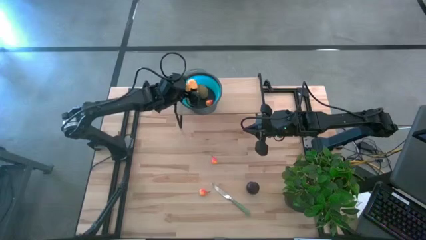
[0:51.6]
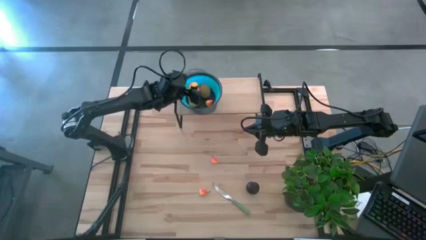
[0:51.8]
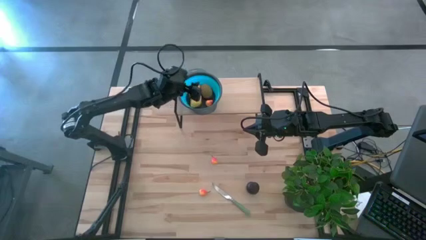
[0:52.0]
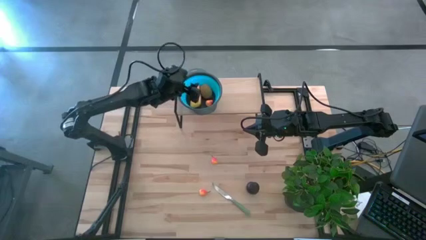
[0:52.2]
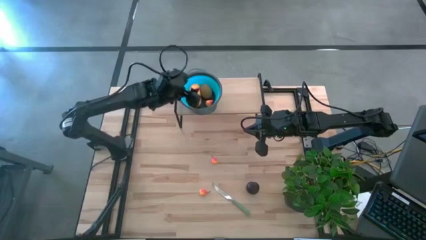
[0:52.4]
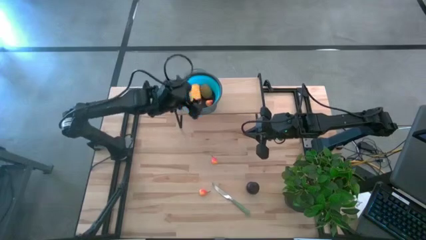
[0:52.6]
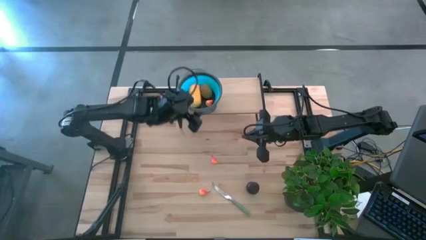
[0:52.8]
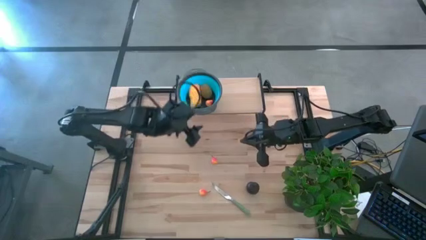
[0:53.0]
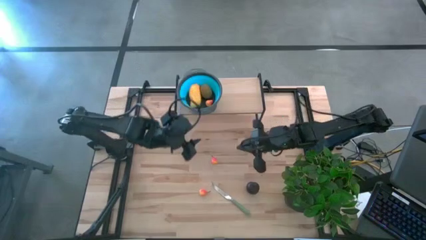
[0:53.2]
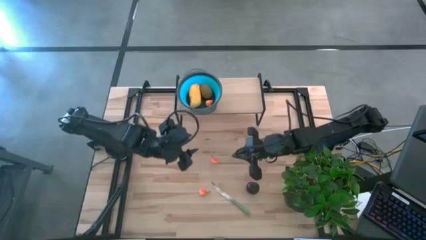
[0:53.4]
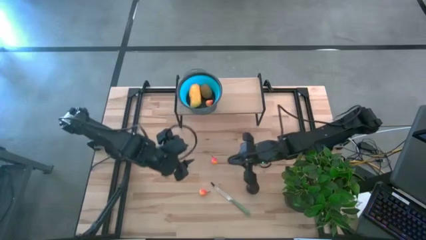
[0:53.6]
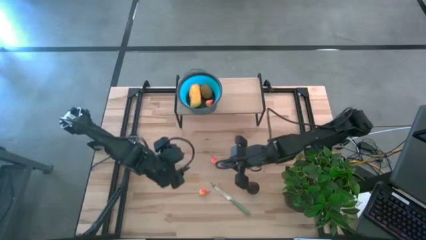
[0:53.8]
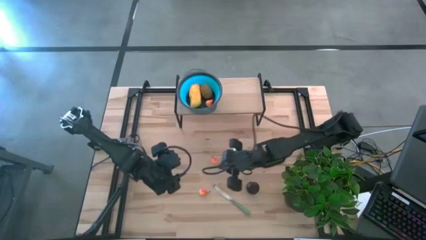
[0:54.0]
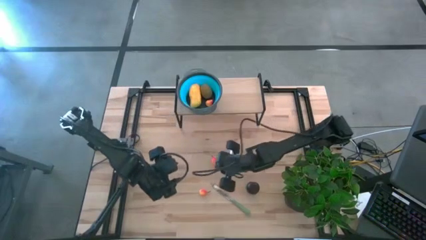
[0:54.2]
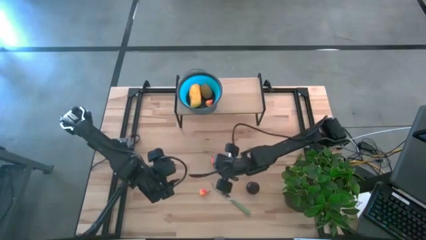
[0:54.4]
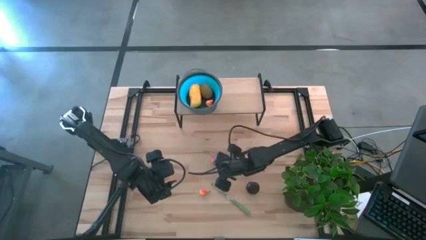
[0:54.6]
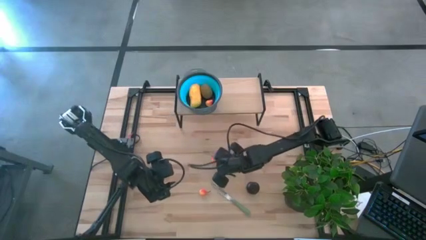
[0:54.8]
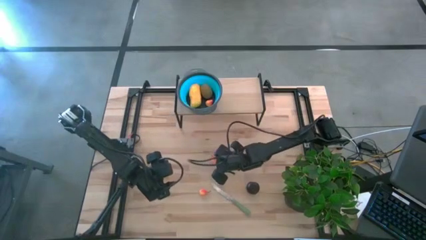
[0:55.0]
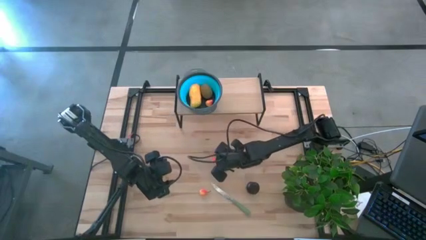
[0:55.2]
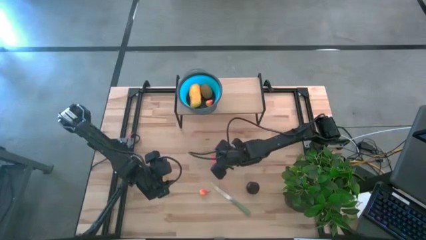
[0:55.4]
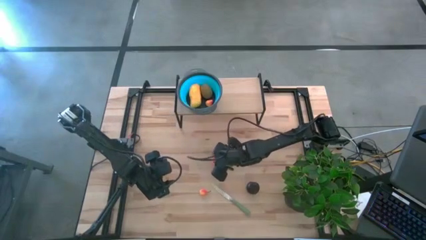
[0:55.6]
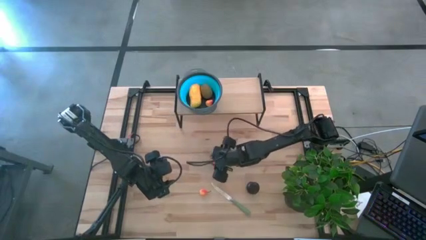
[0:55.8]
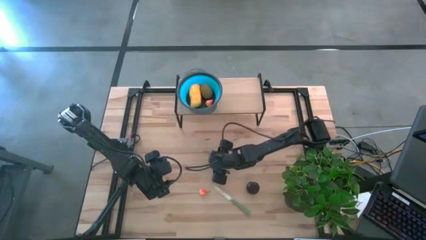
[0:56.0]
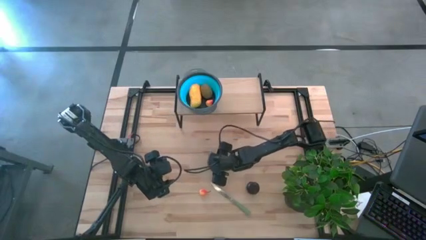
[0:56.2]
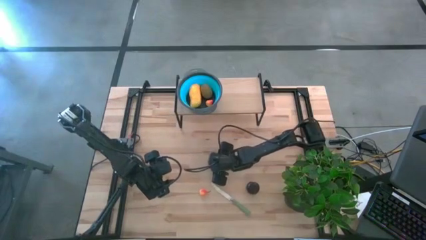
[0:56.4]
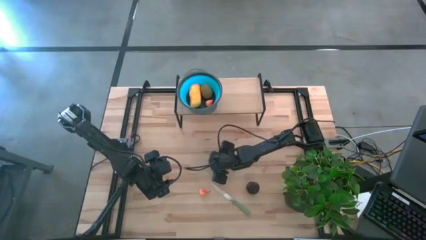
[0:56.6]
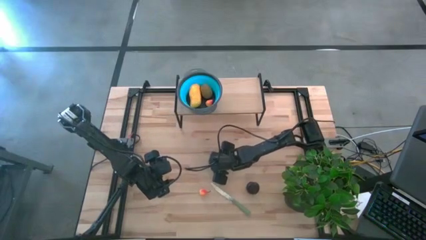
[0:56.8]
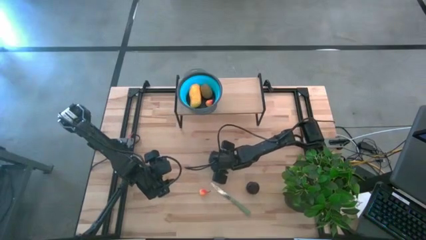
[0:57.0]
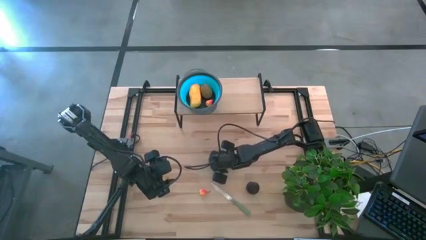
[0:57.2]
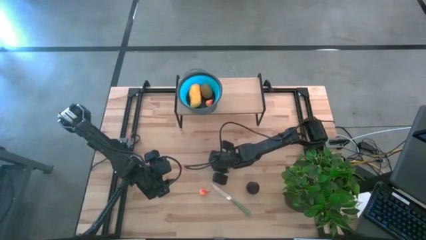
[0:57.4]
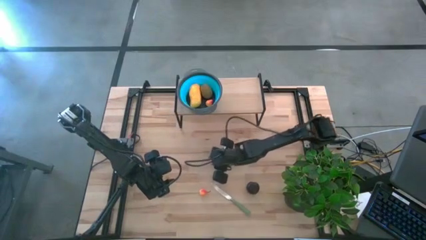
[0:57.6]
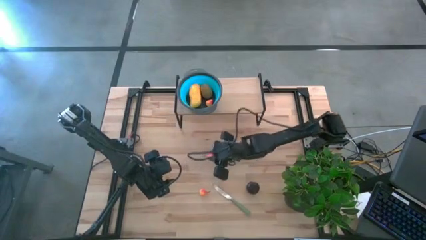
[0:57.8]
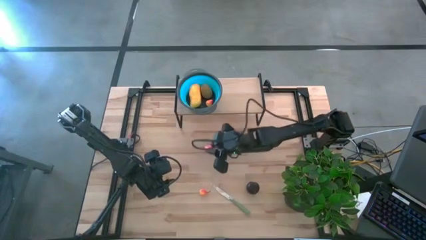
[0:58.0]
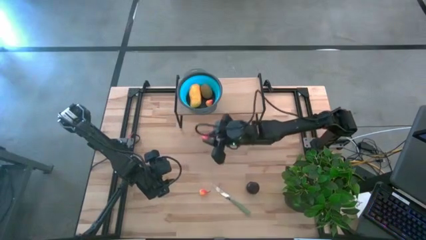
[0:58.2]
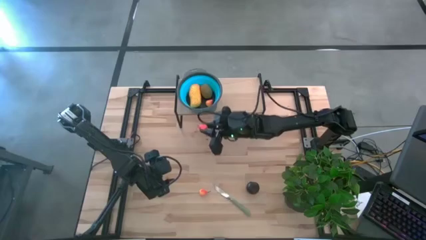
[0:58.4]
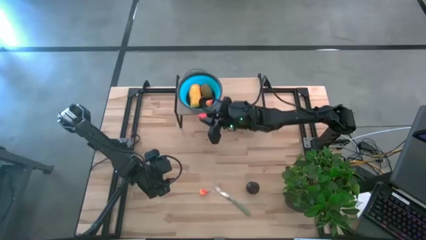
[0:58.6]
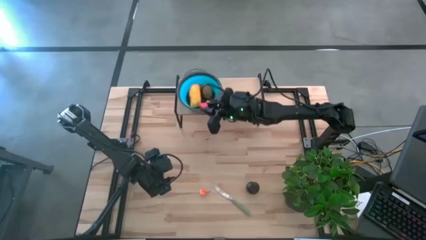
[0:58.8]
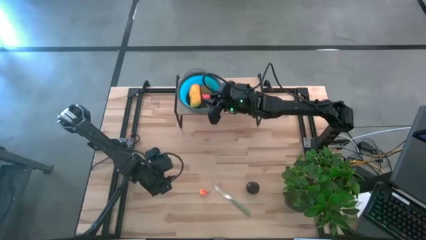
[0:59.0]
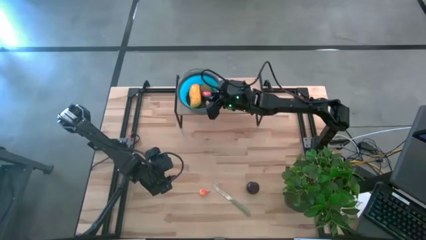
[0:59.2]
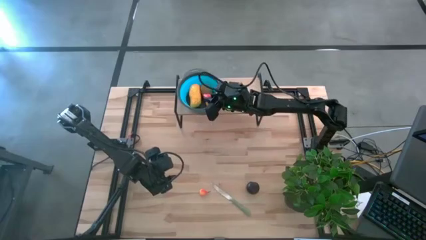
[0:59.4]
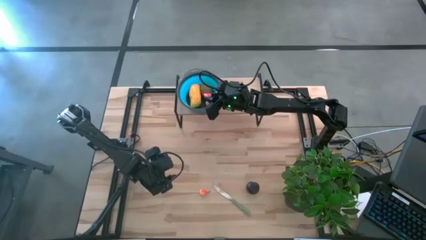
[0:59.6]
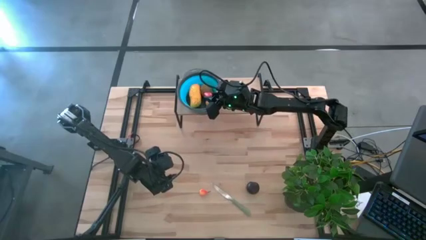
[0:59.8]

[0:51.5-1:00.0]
Task: Pick & Place Fruit
Put the top pear into the blue strainer bowl on the shelf

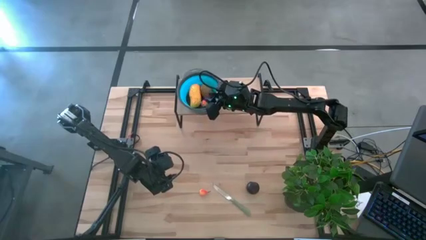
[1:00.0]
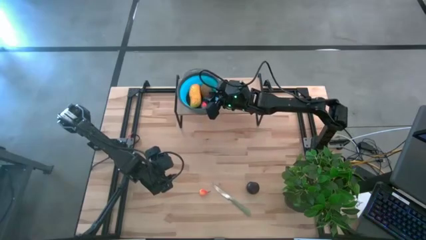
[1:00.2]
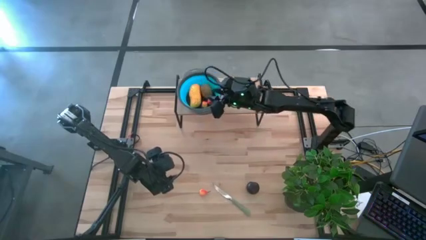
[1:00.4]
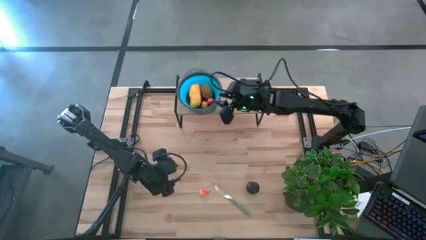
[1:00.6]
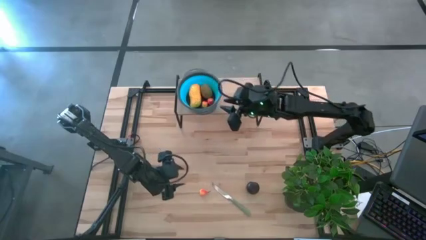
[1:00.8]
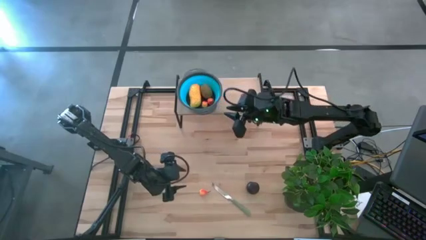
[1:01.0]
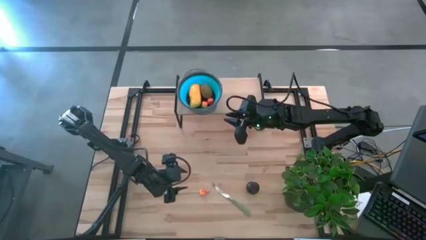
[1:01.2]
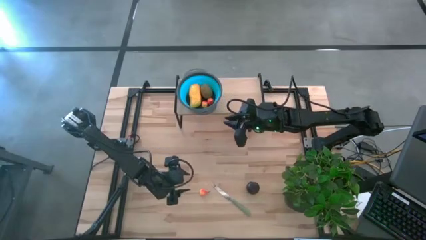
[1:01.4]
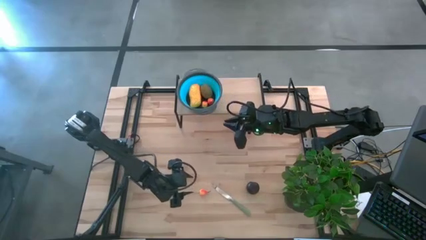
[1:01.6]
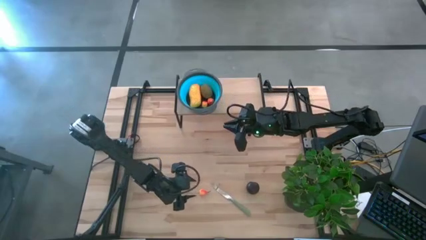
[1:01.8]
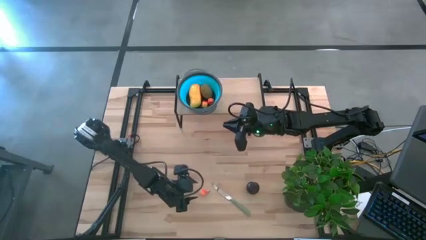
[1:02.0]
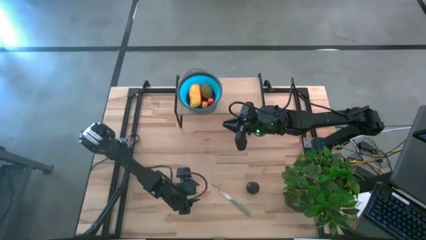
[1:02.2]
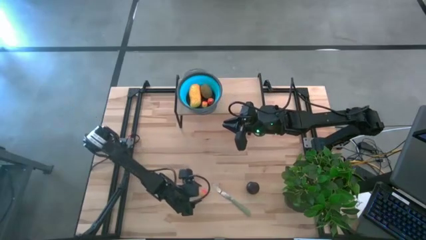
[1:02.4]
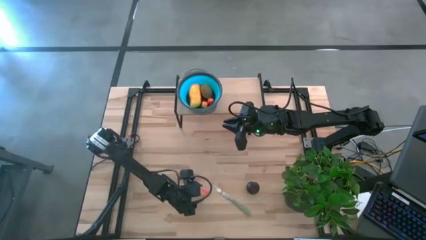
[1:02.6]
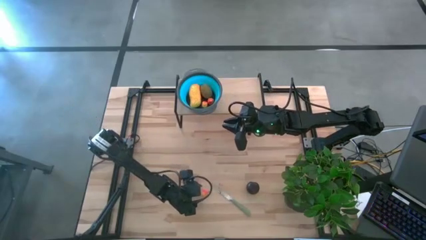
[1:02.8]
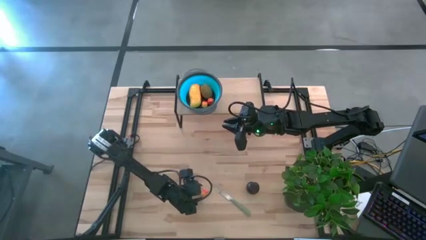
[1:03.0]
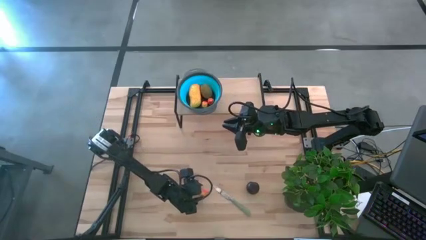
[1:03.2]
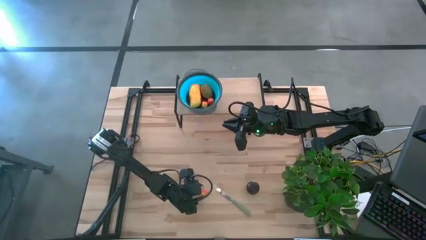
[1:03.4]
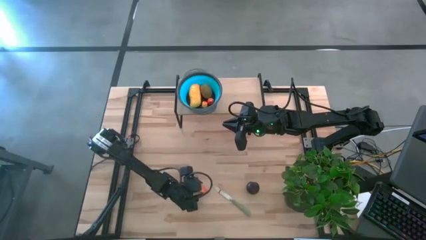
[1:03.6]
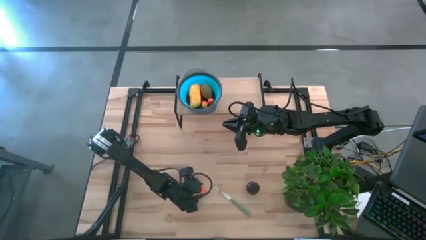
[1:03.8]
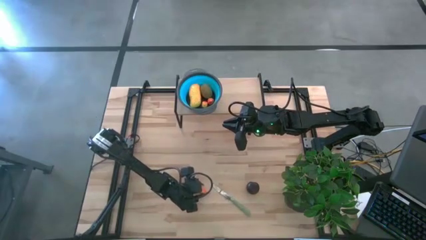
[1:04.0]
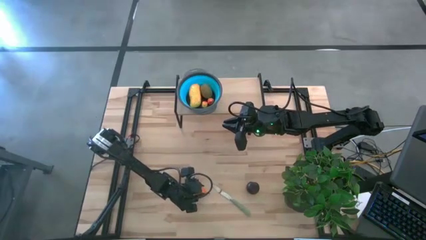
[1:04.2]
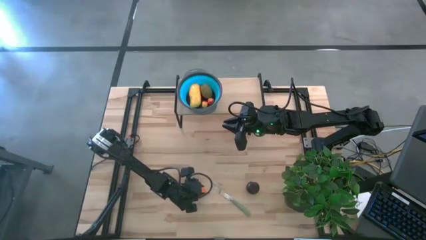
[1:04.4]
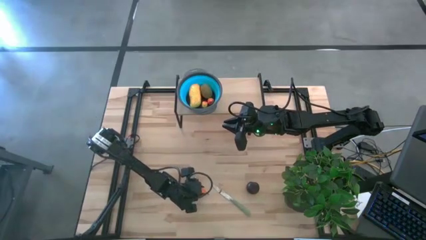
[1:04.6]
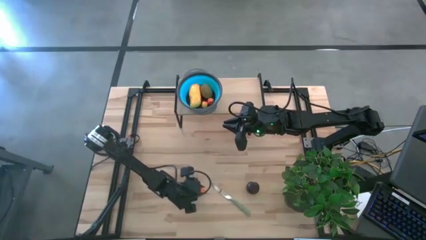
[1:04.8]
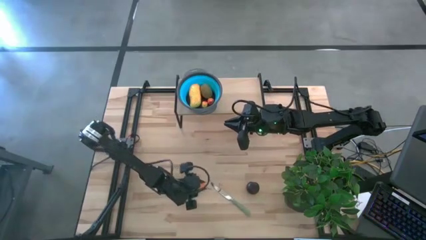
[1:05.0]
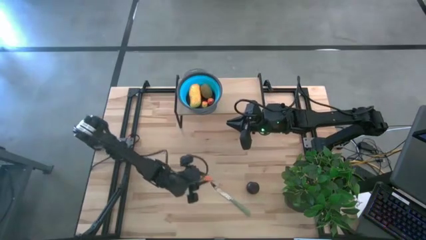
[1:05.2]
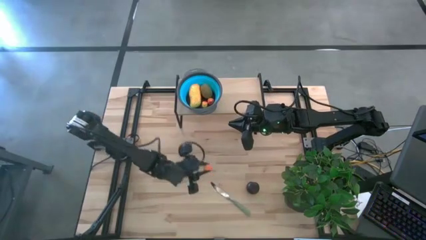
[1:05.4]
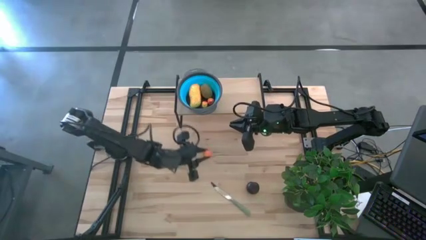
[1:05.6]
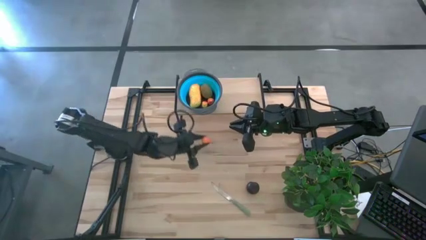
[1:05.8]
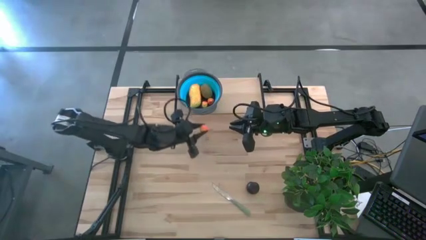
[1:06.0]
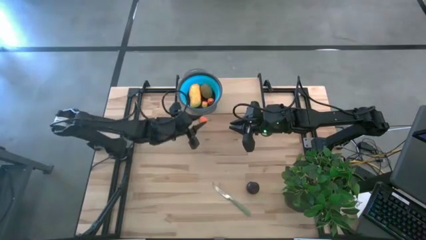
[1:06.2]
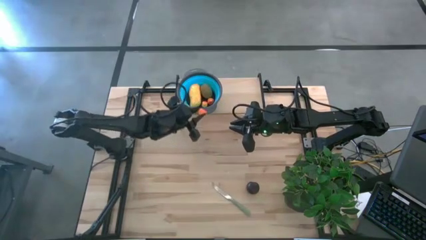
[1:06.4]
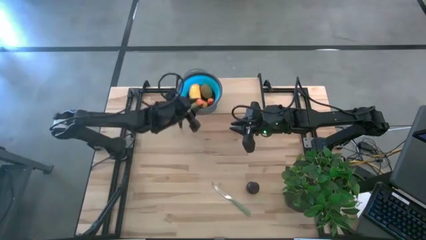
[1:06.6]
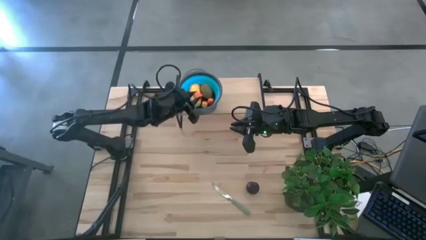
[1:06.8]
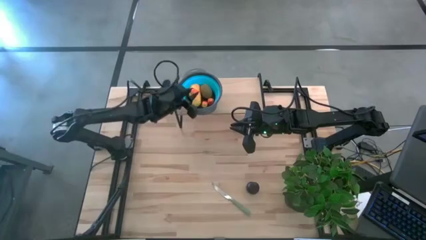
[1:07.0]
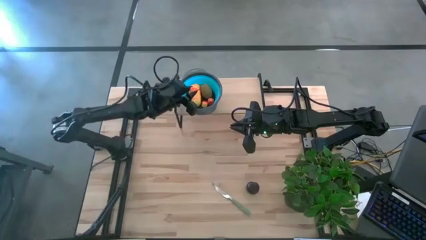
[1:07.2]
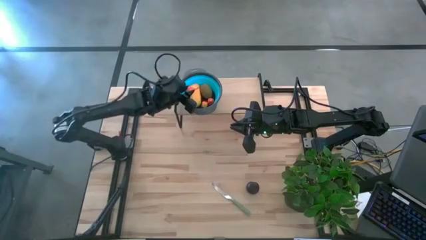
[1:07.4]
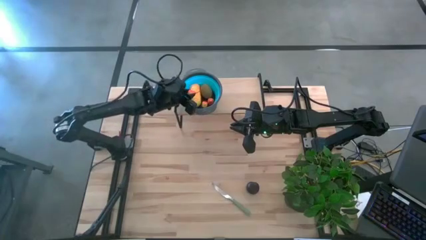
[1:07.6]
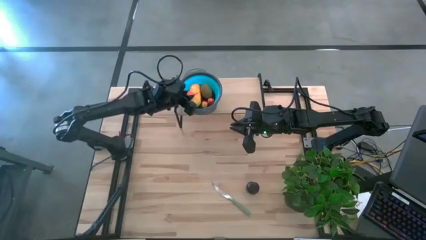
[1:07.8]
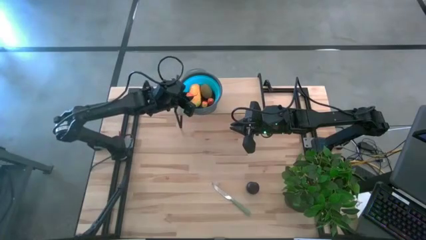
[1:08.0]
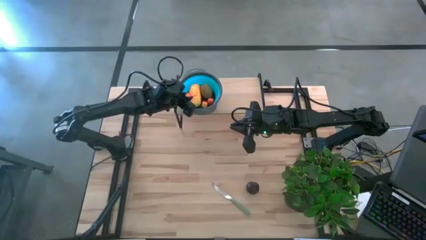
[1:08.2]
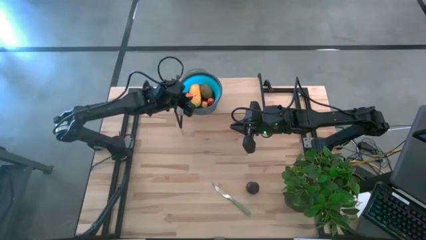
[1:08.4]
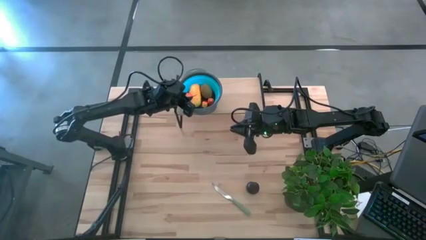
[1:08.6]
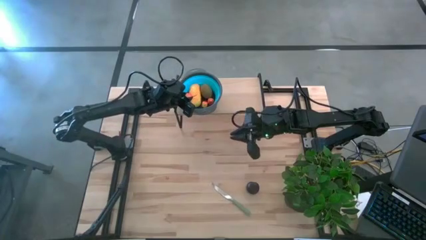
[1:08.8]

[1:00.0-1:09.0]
Put the pear into the blue strainer bowl on the shelf
